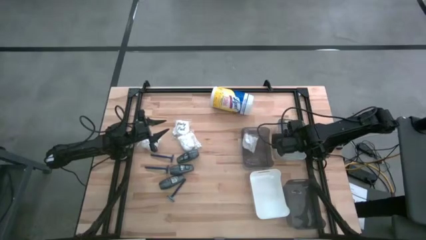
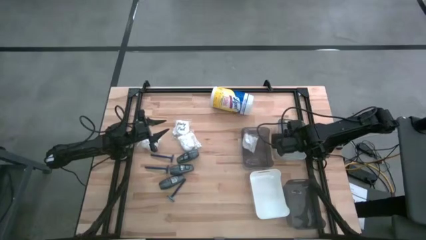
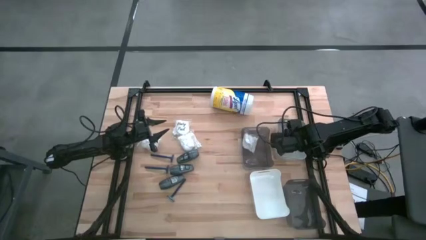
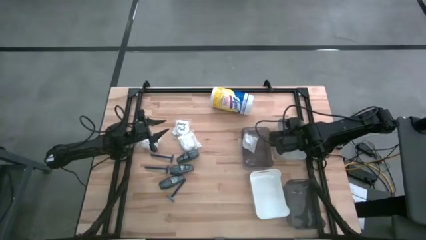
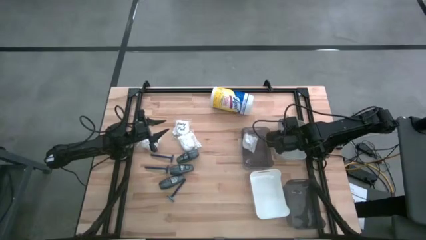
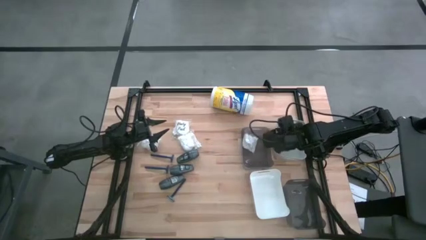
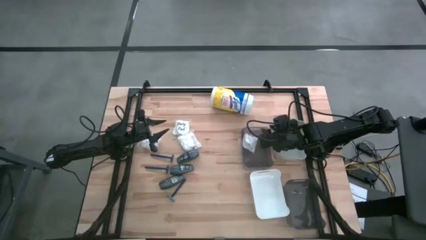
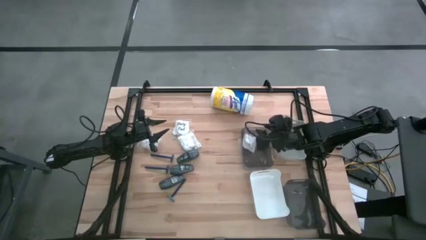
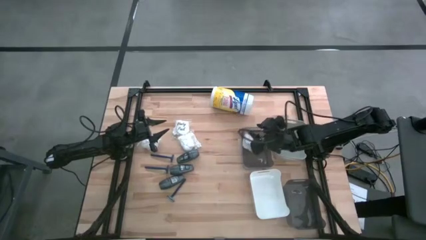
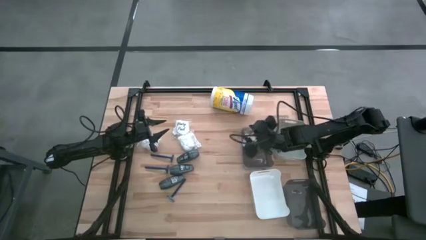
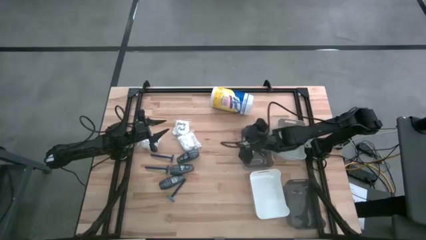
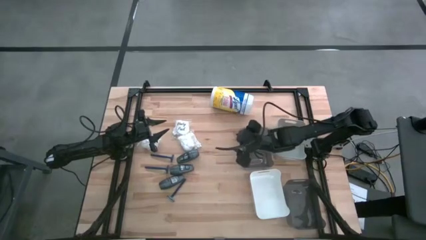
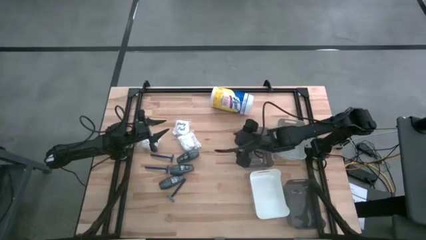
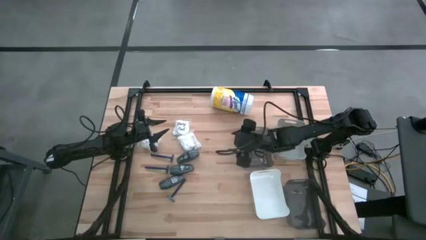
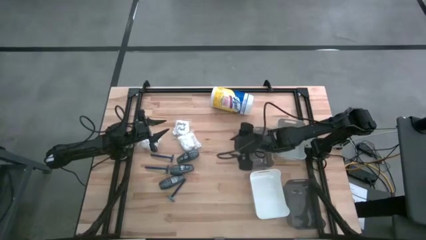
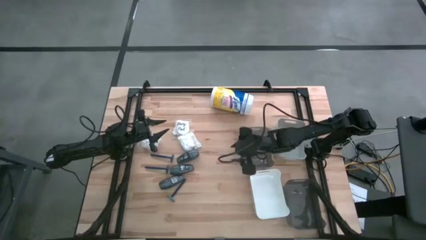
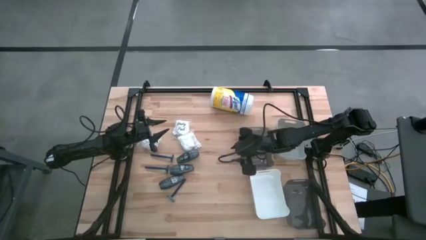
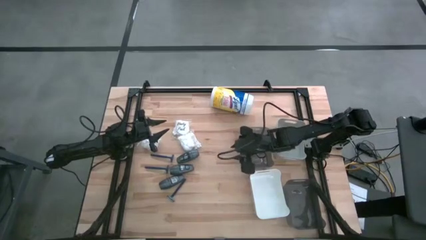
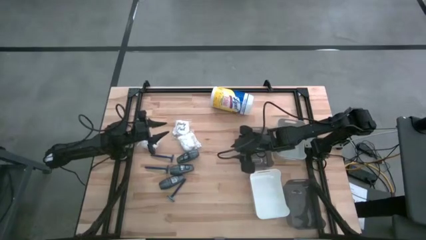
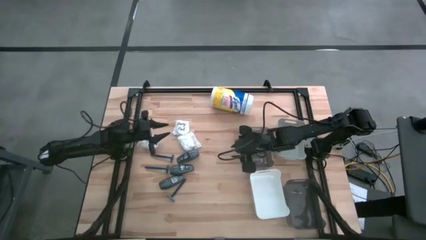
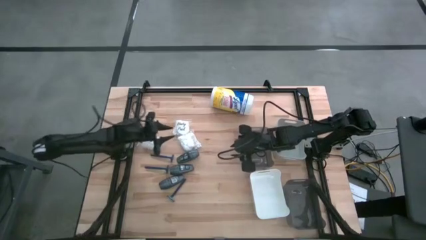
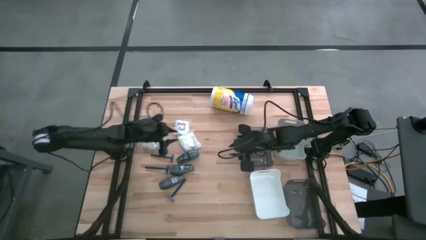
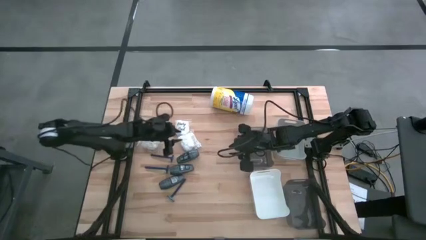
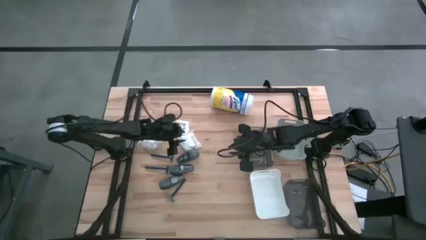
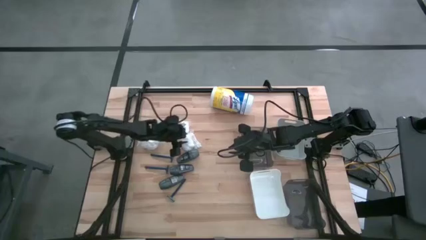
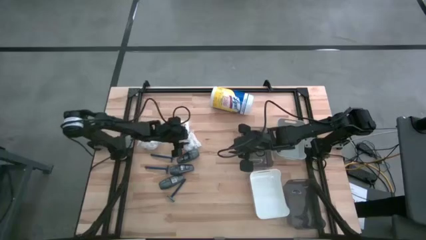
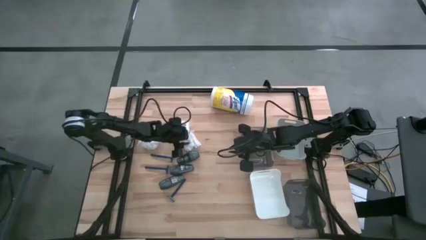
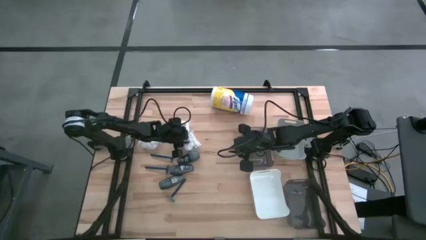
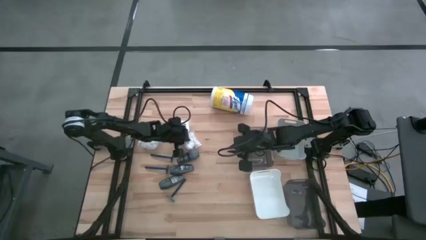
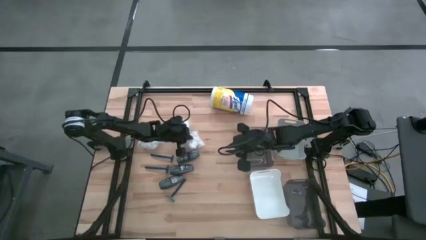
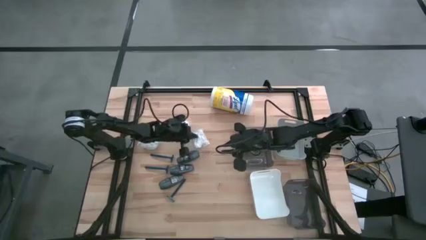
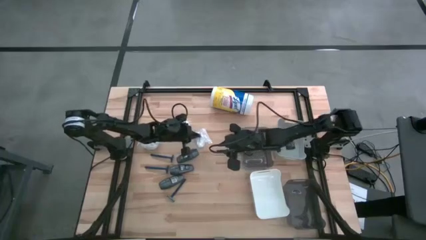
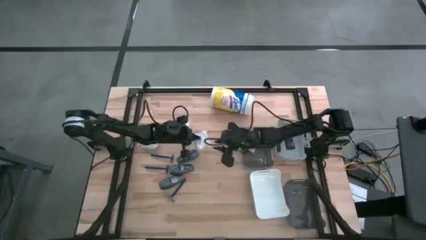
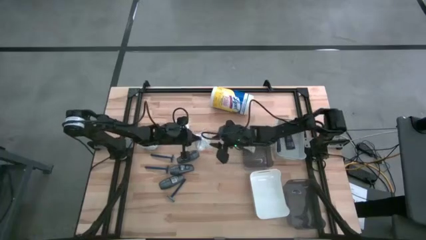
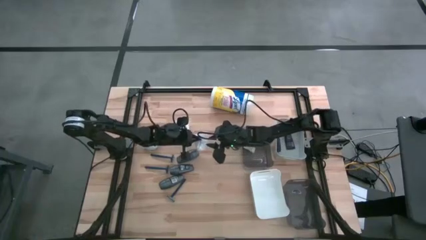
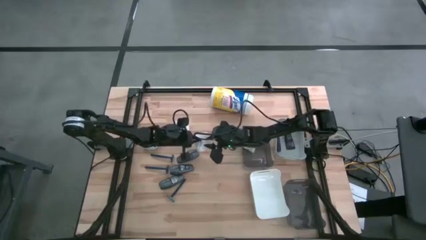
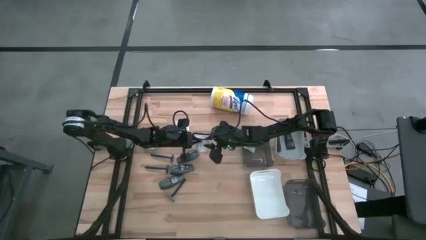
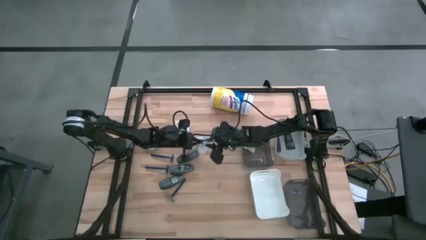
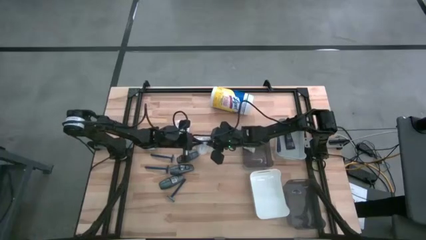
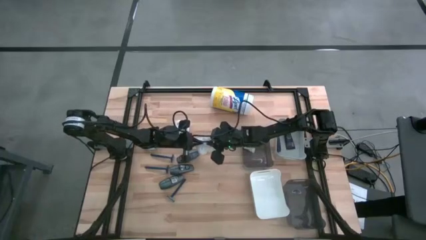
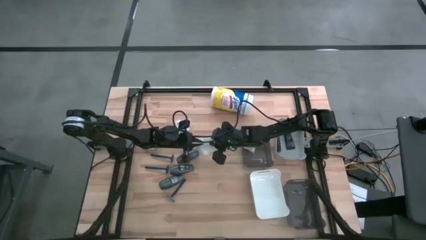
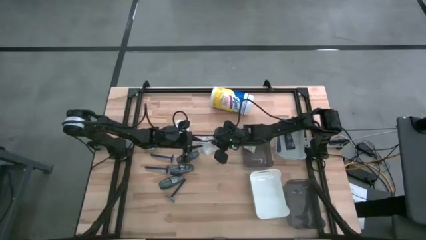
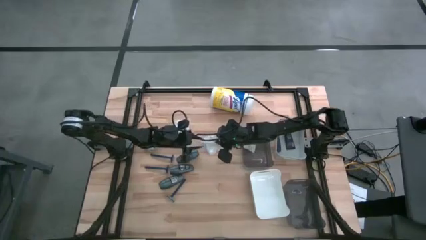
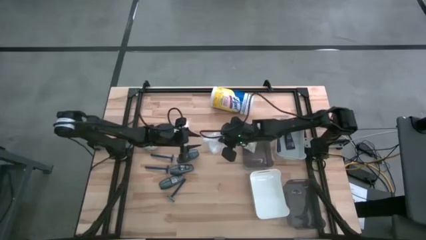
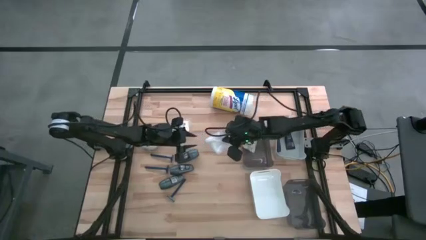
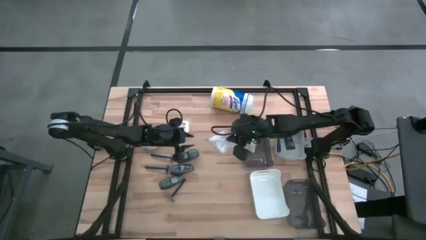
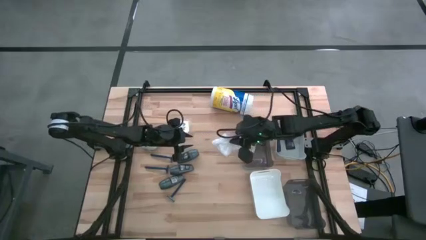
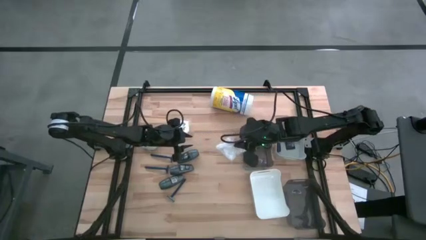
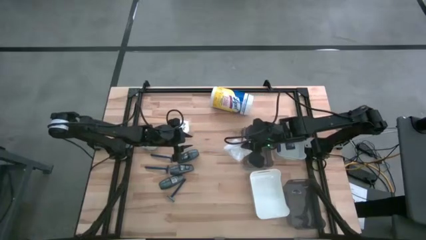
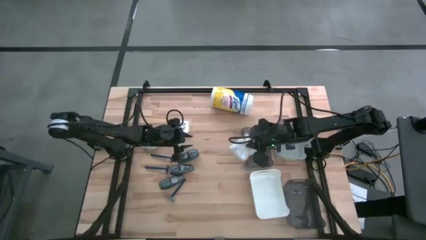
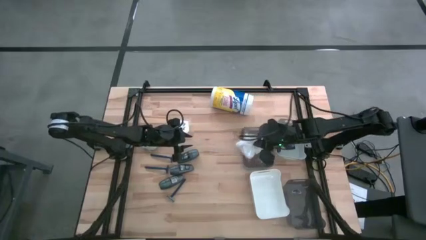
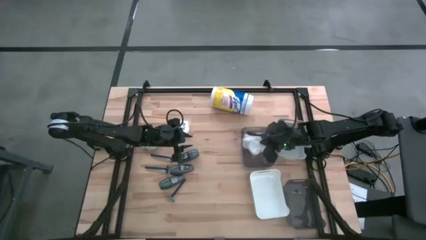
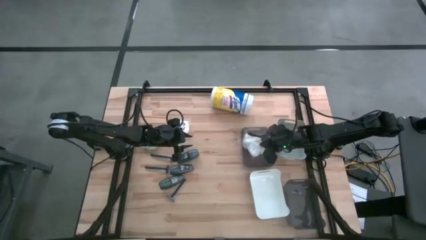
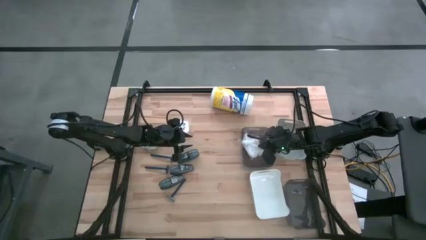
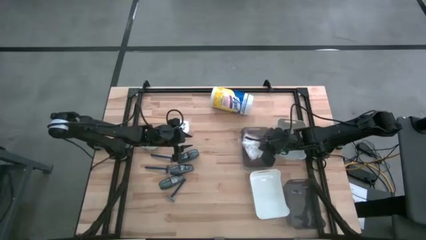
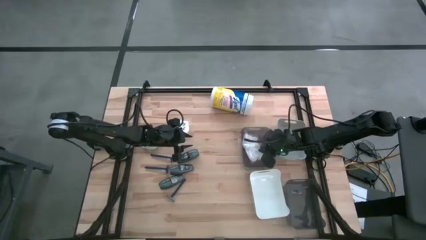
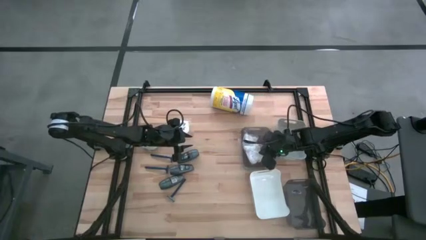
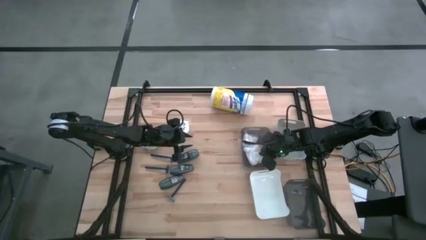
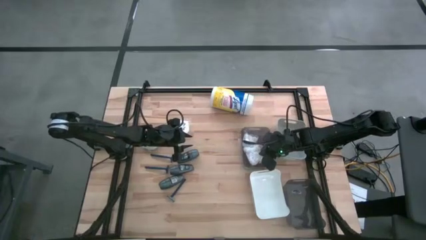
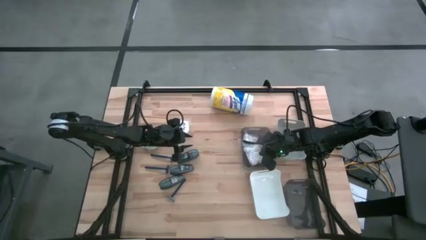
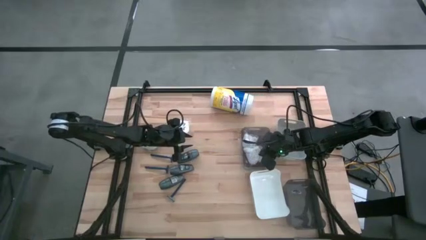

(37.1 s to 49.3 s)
Task: Pick & Place Travel size toiletries
Put the right cotton pack into the top black bin
